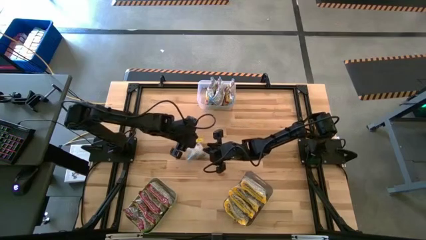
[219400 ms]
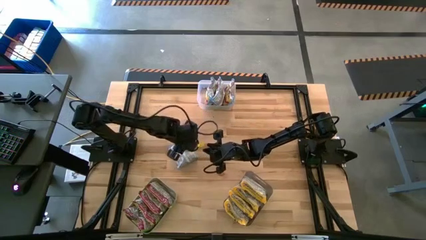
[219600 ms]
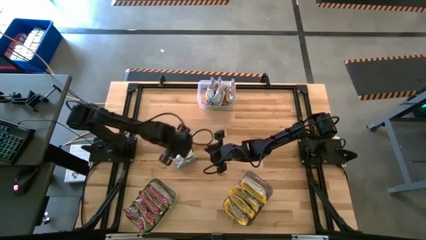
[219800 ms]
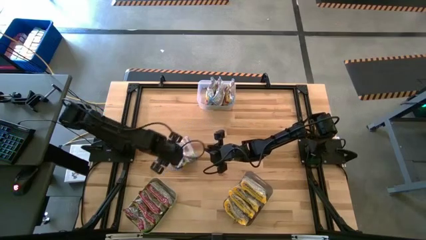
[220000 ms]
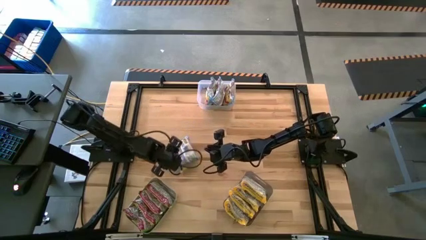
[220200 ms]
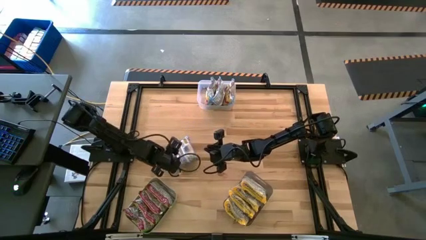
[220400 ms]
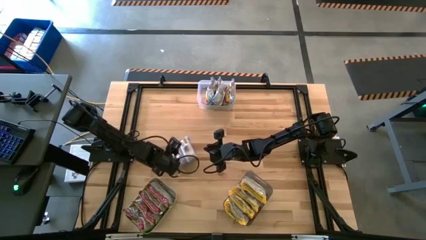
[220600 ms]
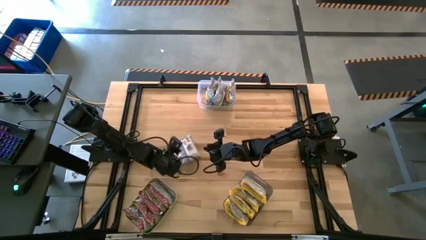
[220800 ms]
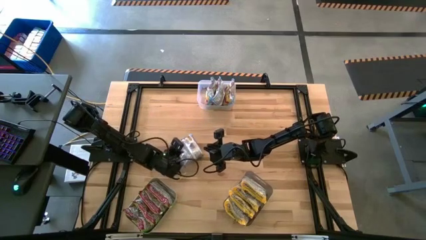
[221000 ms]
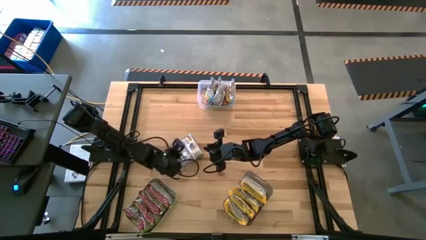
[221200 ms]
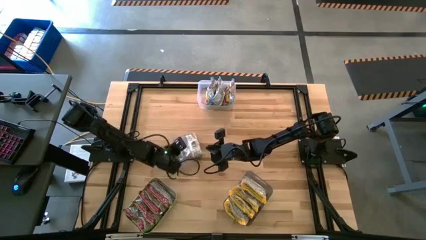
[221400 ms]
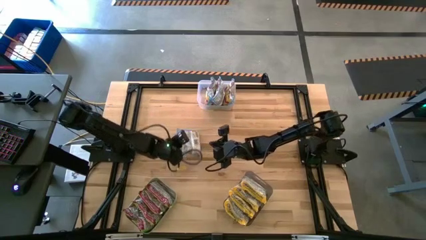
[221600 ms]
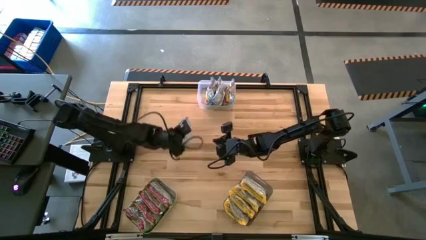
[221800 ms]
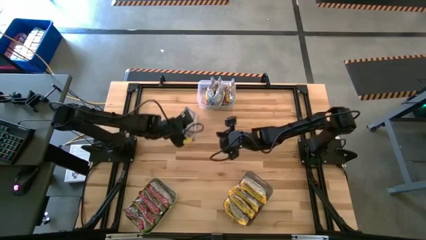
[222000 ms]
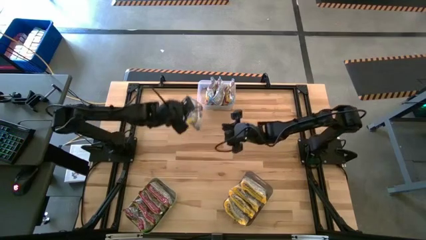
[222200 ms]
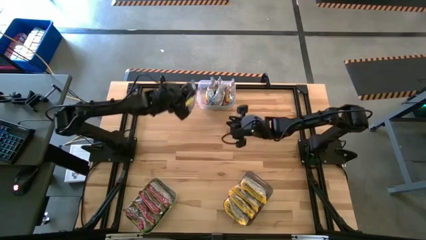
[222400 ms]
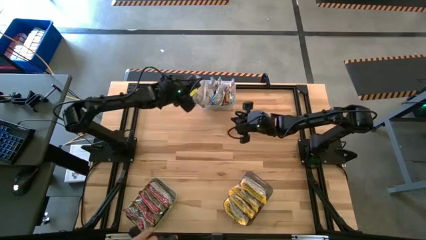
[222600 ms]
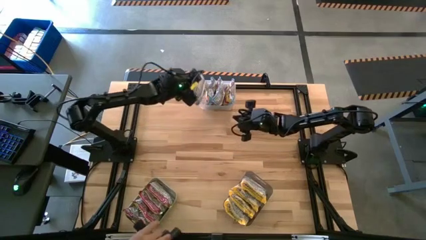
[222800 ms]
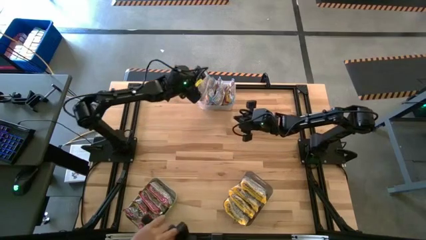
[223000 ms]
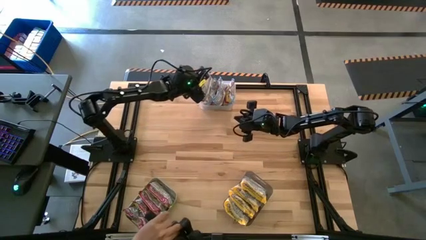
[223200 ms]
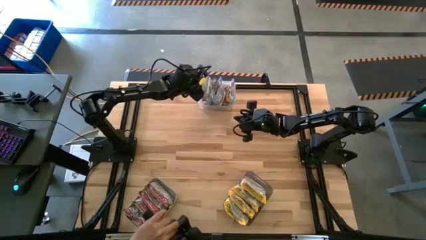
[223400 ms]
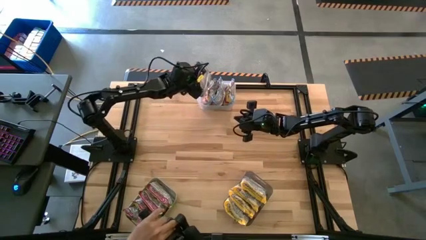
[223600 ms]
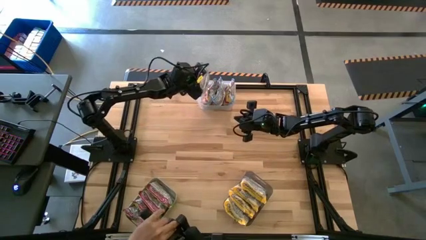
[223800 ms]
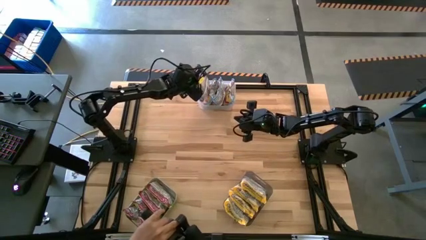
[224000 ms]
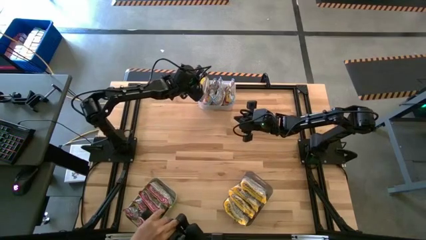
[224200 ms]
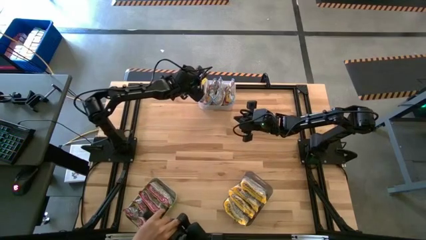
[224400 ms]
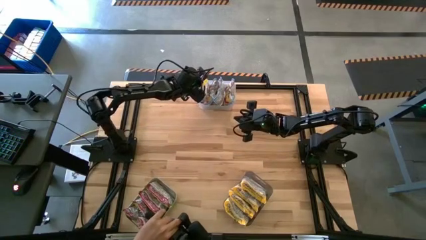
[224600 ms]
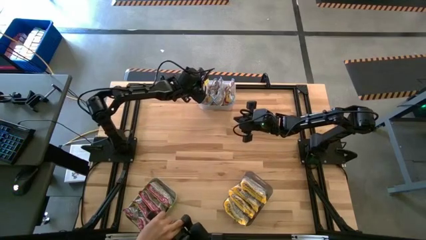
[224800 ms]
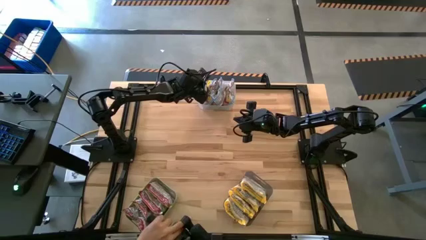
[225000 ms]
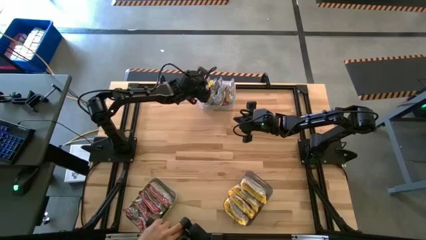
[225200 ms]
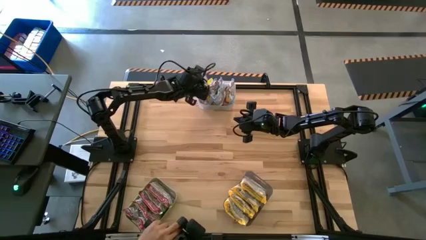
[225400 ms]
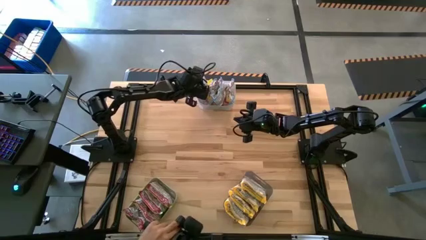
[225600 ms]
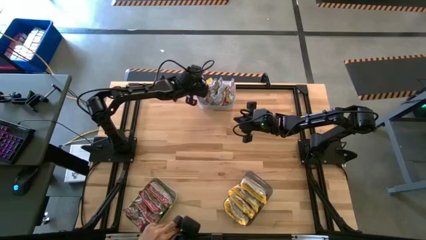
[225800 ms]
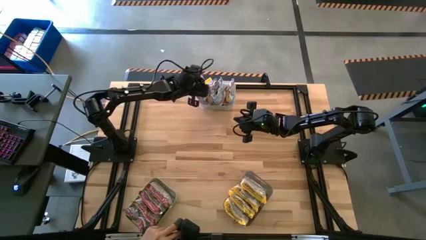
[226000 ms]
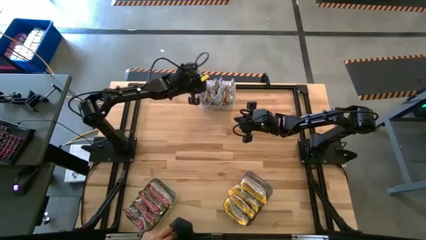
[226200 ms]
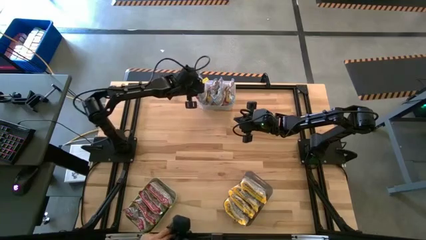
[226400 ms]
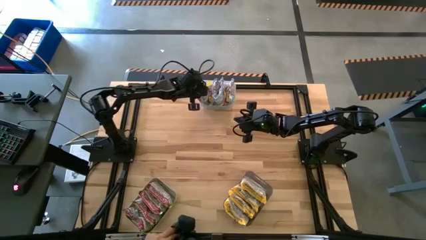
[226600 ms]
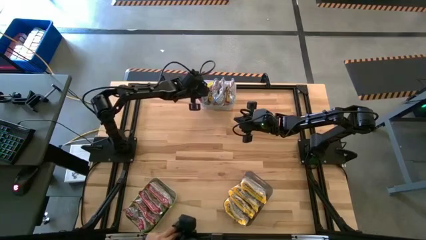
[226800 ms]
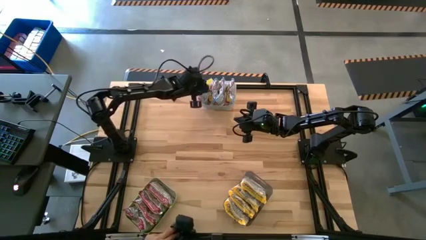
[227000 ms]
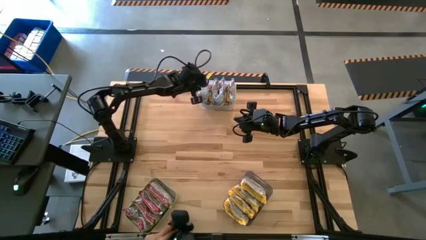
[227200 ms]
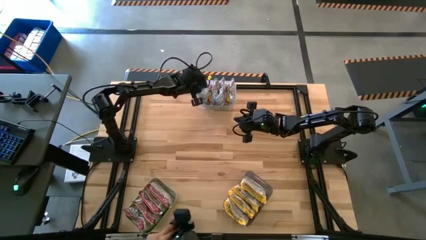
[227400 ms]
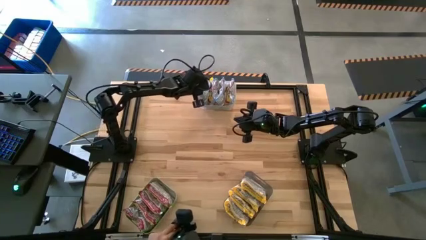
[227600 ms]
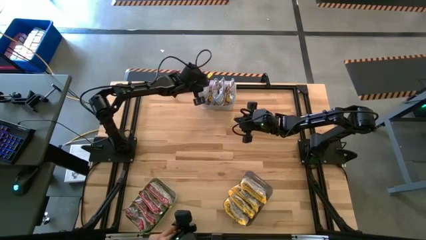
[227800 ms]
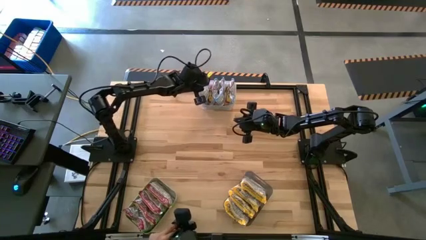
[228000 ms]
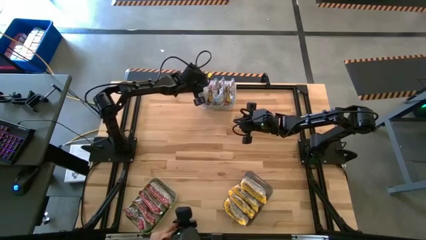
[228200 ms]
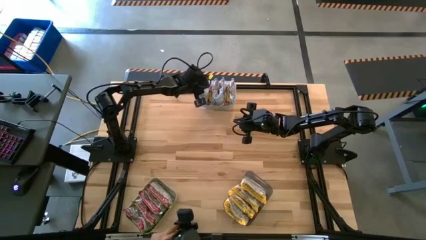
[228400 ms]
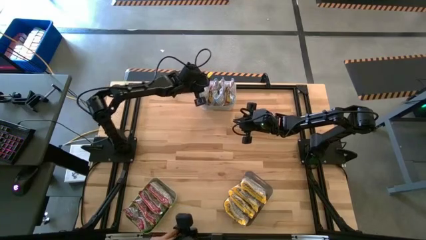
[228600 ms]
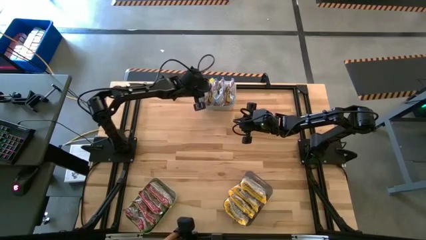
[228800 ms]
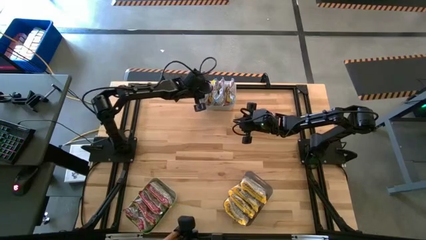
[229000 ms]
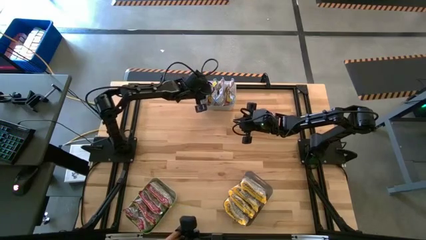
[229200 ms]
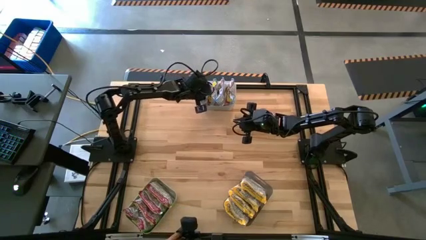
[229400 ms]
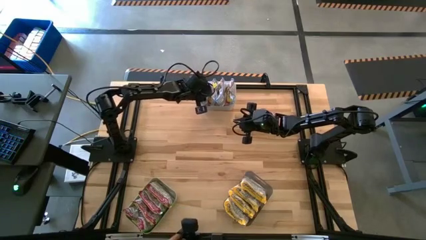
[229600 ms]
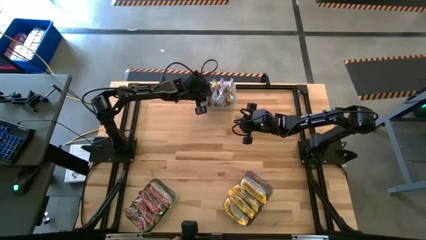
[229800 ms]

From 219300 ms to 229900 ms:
Task: Sort Maruchan noodles
Put the light blue noodle pack into the transparent bin

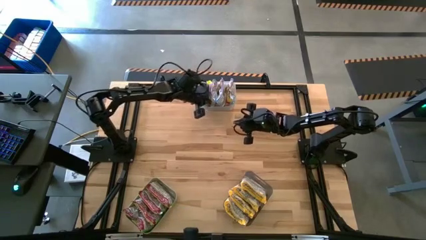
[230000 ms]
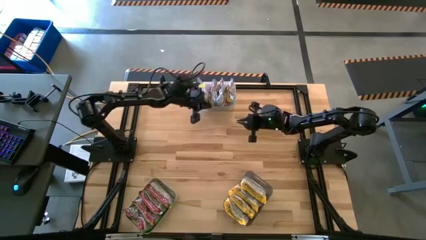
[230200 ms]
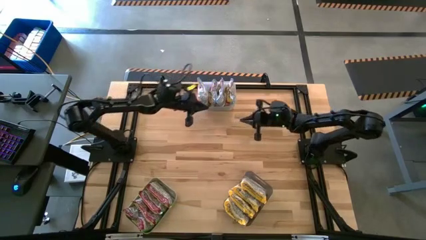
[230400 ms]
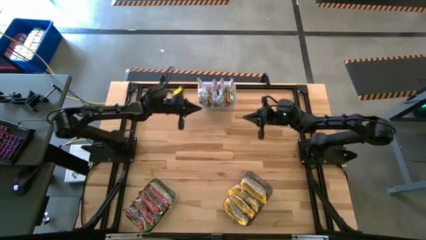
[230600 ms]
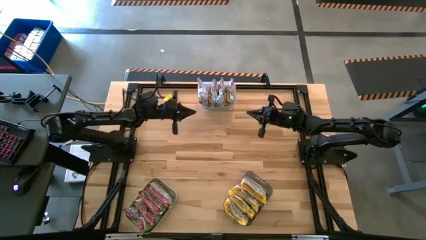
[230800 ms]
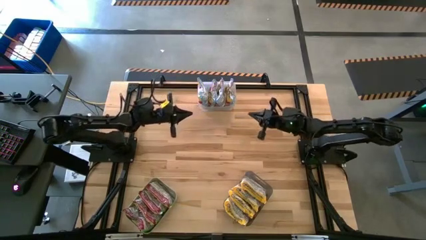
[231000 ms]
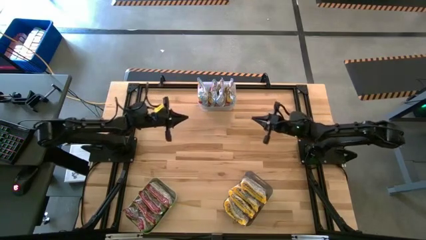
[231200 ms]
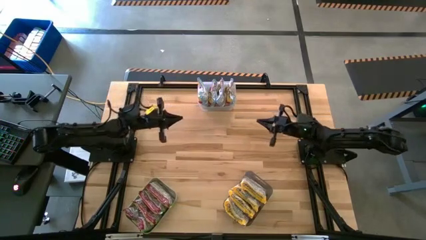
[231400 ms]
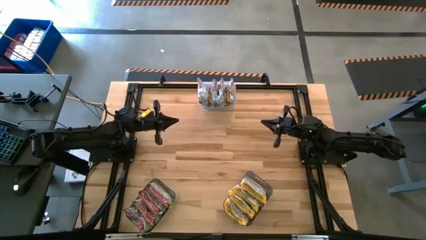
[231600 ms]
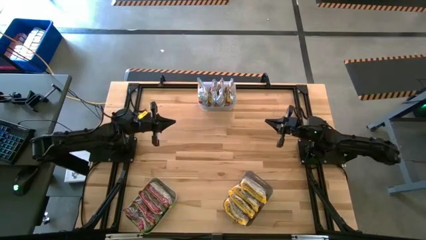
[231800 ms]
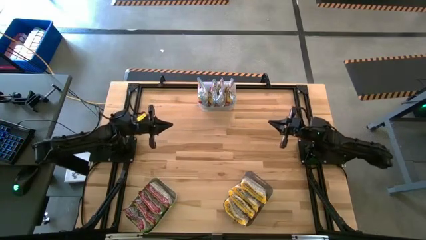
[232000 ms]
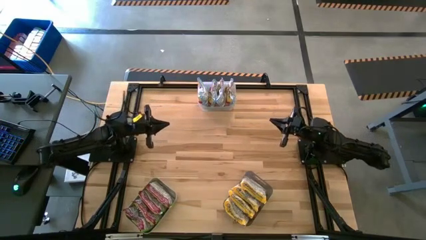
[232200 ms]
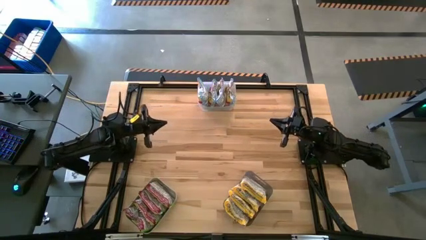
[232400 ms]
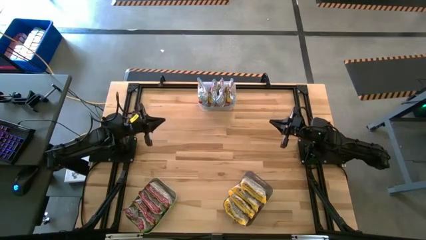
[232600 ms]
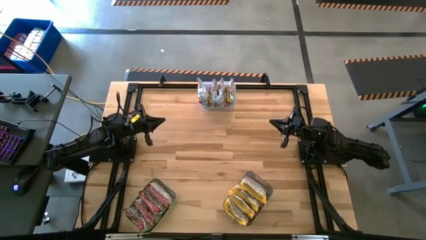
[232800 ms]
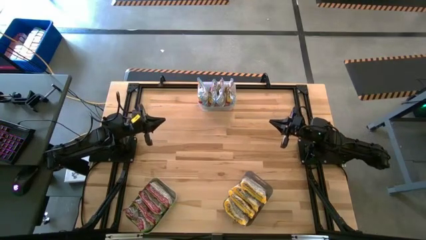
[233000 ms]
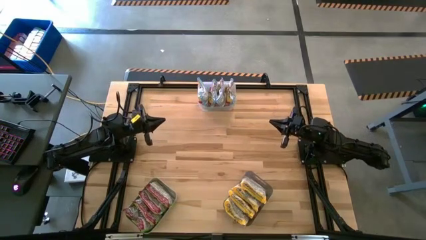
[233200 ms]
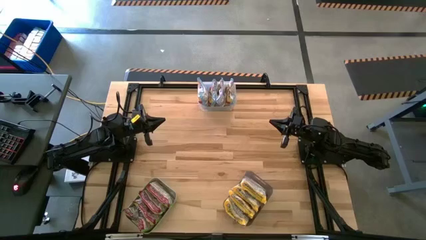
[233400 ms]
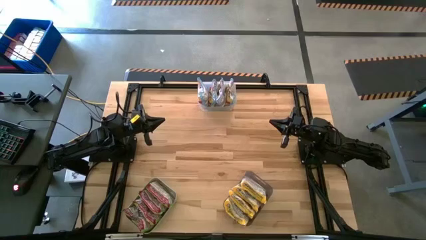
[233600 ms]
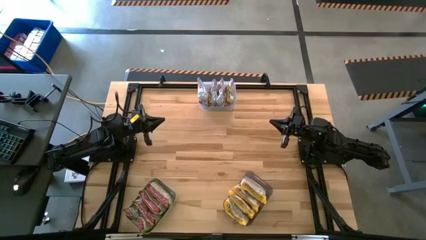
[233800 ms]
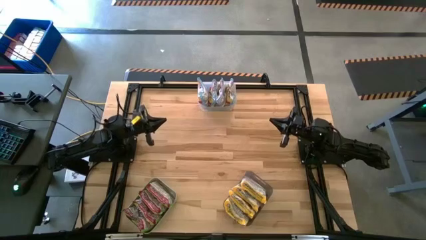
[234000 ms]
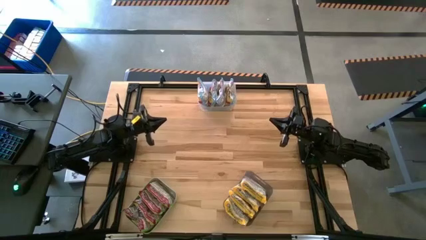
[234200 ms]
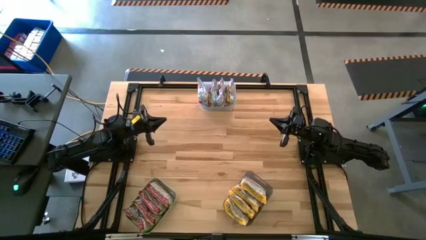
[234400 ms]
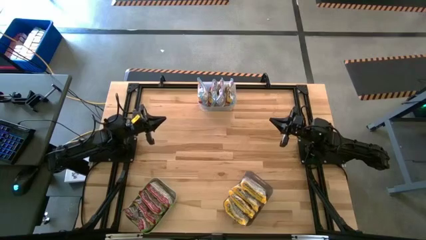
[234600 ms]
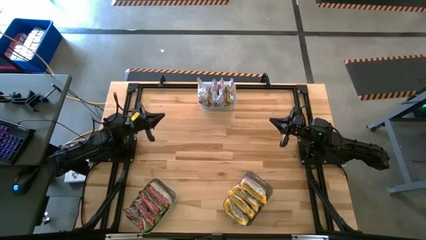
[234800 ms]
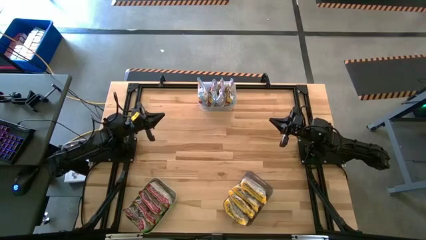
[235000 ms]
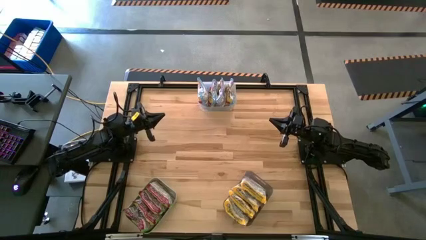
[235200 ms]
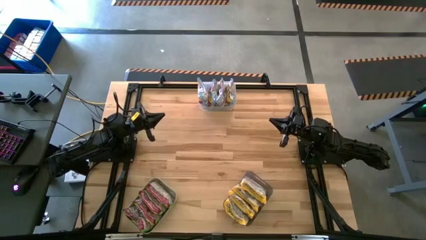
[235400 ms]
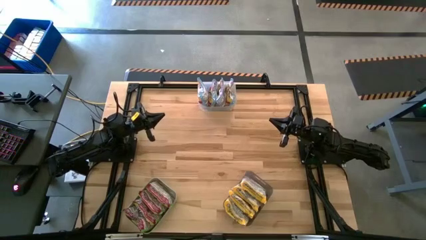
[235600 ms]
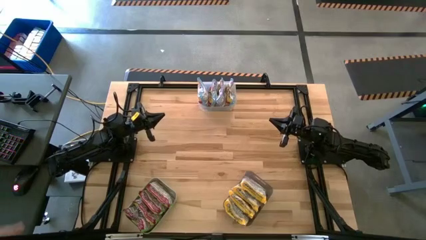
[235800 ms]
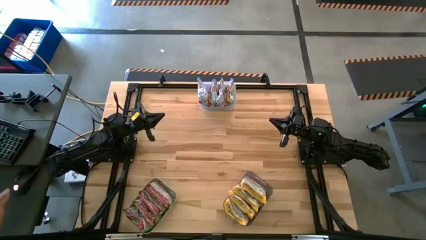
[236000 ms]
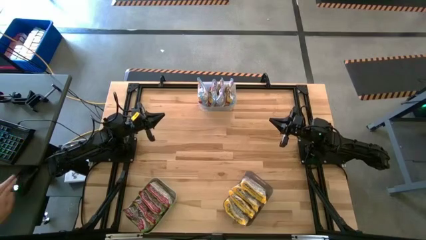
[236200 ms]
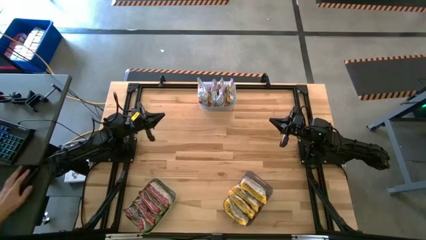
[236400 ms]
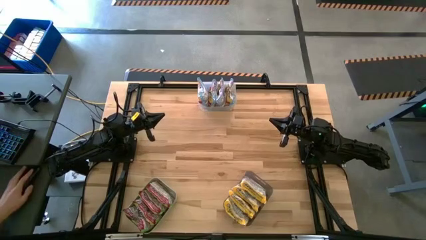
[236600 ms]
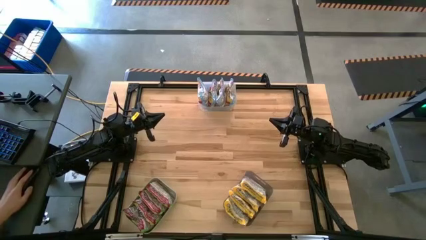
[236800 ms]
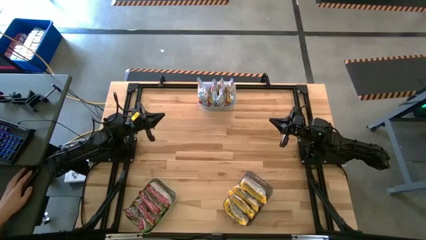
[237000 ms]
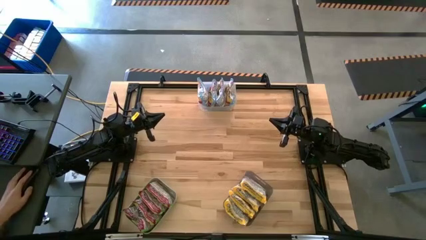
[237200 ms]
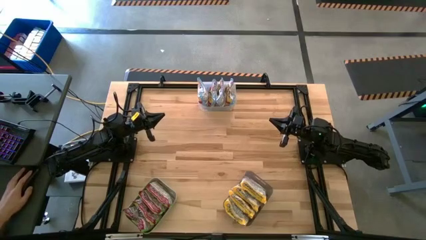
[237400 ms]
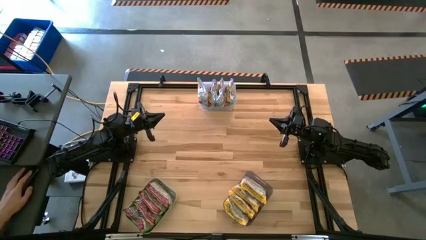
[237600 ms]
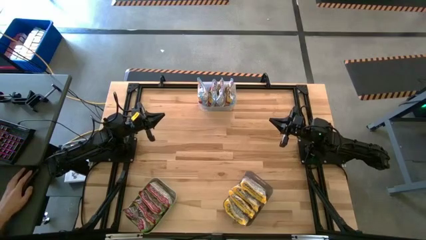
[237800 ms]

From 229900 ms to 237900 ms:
Return to Home Position
